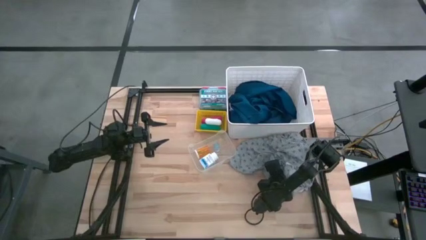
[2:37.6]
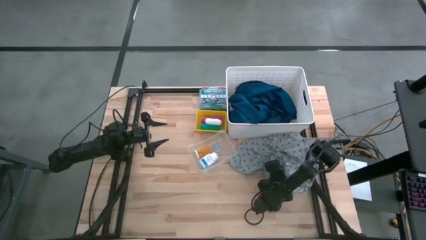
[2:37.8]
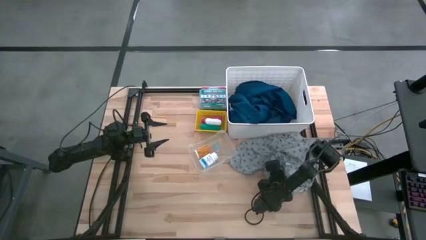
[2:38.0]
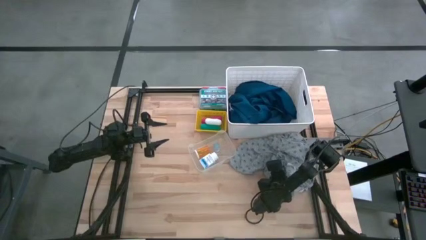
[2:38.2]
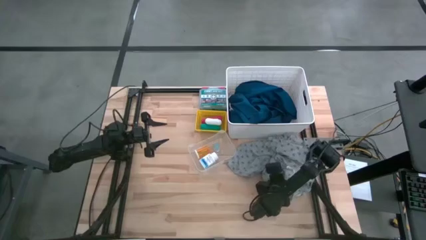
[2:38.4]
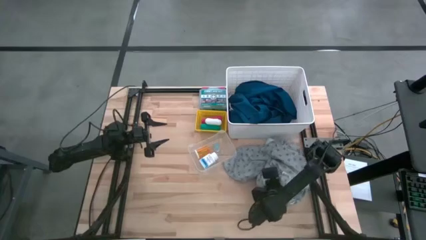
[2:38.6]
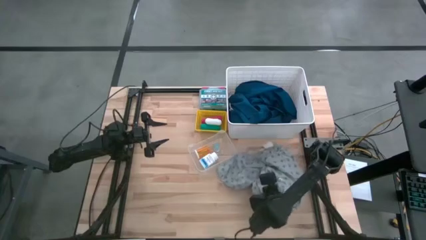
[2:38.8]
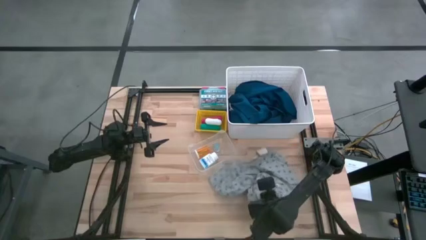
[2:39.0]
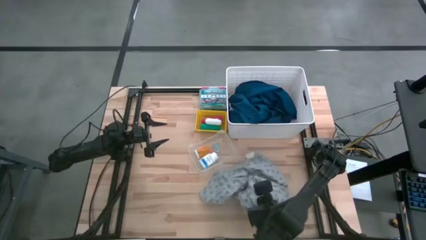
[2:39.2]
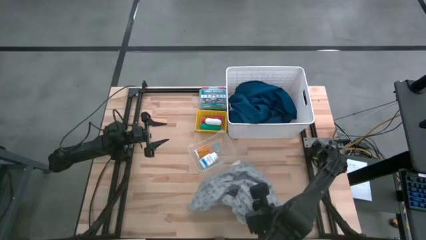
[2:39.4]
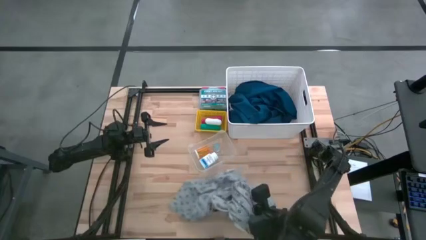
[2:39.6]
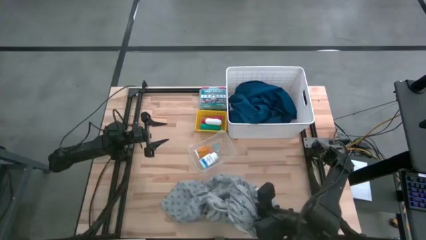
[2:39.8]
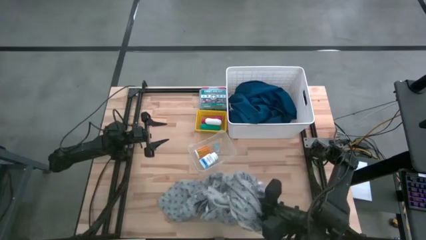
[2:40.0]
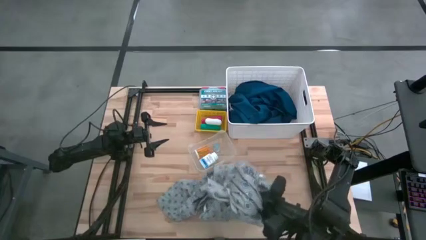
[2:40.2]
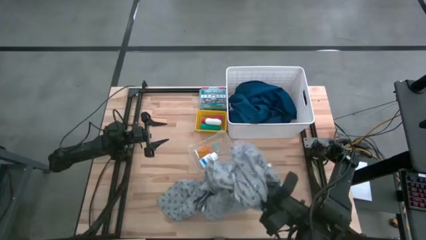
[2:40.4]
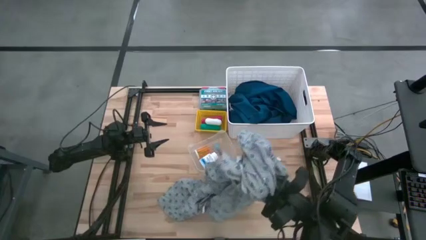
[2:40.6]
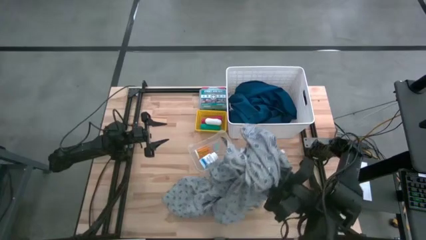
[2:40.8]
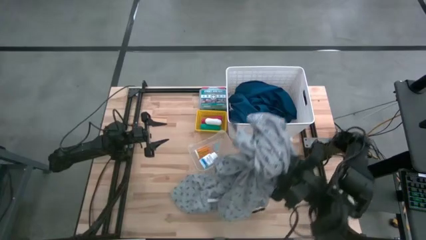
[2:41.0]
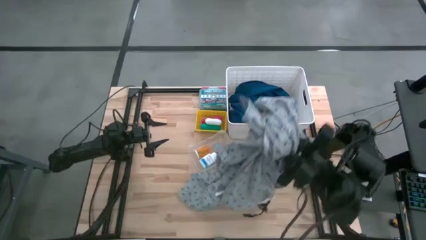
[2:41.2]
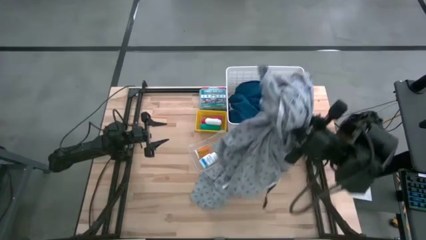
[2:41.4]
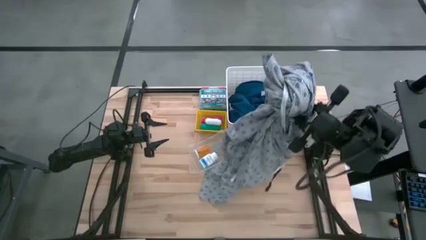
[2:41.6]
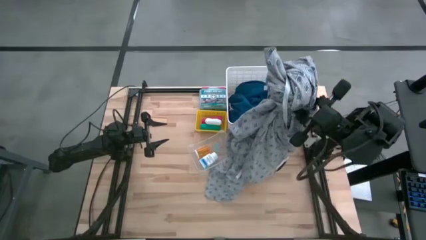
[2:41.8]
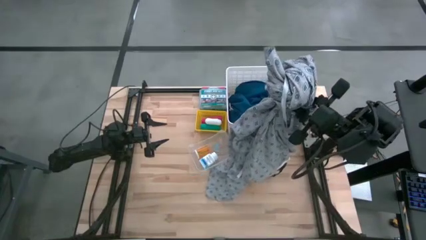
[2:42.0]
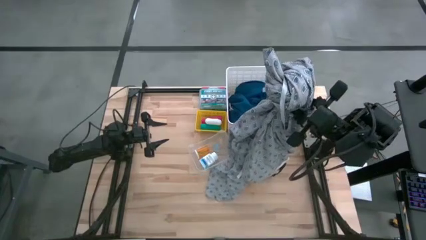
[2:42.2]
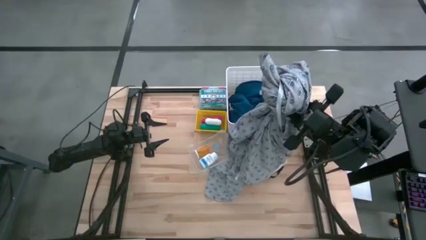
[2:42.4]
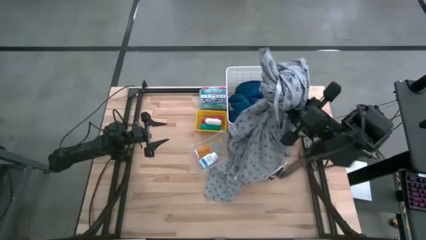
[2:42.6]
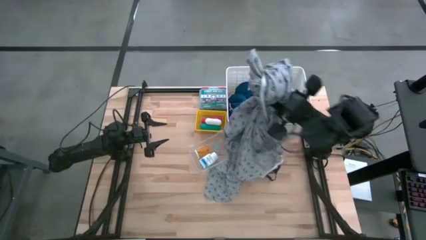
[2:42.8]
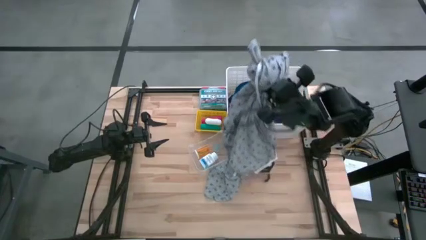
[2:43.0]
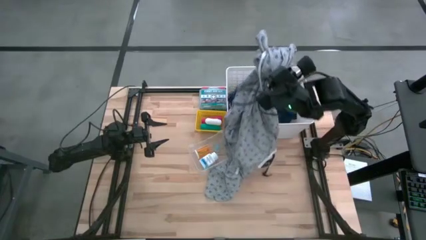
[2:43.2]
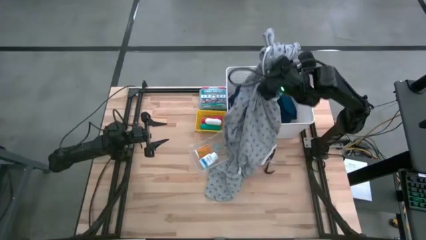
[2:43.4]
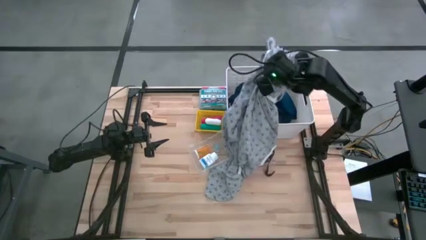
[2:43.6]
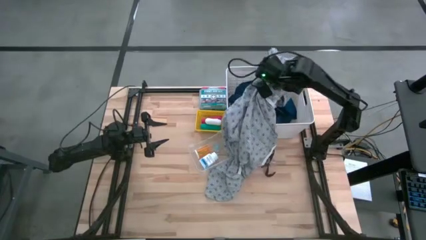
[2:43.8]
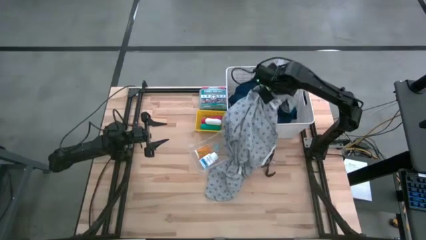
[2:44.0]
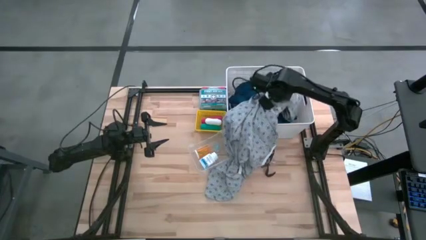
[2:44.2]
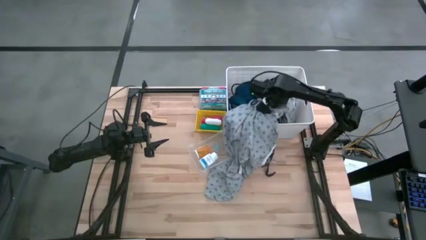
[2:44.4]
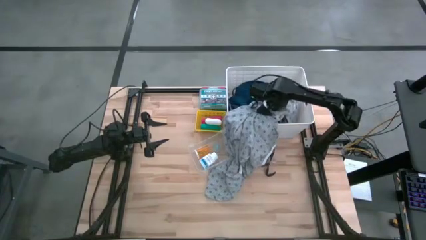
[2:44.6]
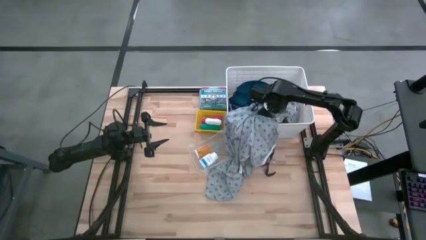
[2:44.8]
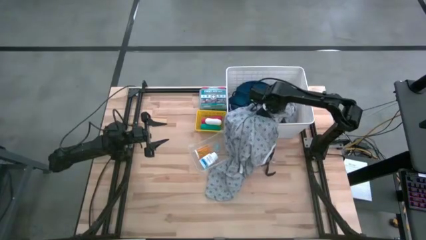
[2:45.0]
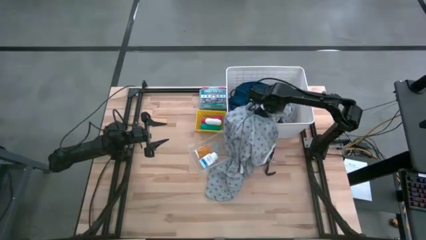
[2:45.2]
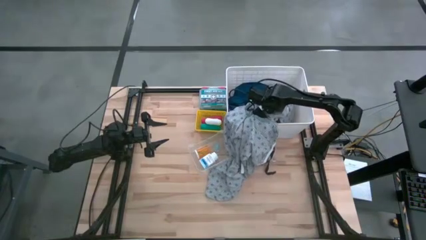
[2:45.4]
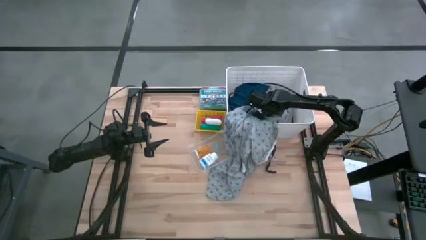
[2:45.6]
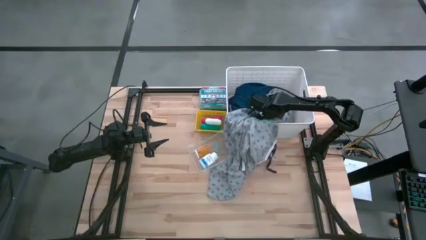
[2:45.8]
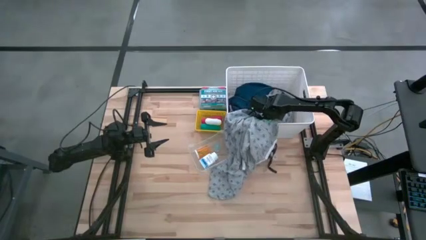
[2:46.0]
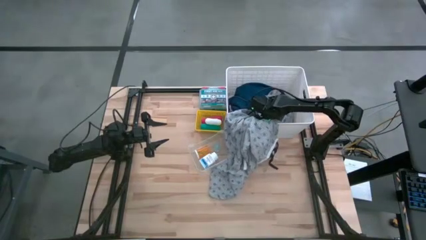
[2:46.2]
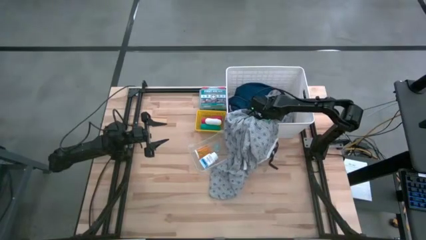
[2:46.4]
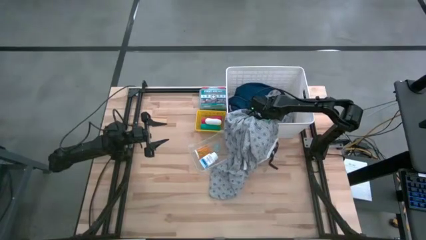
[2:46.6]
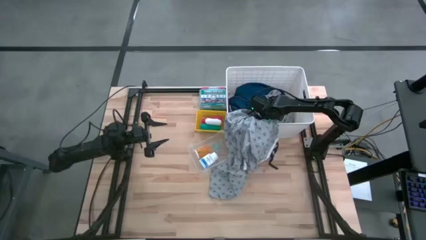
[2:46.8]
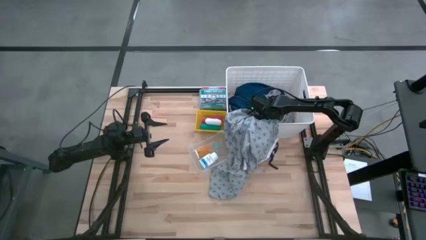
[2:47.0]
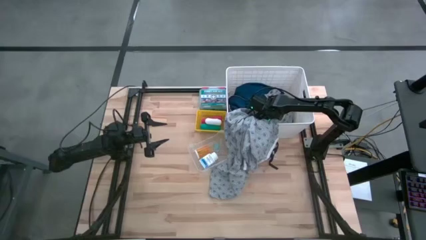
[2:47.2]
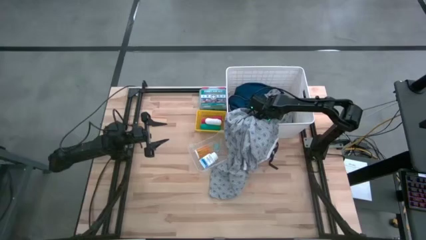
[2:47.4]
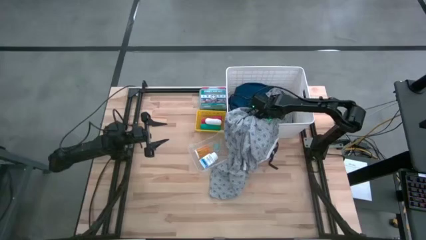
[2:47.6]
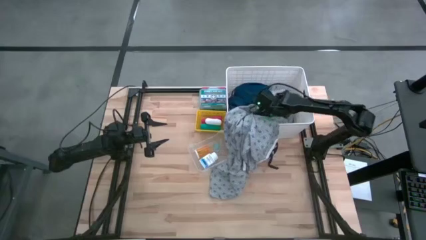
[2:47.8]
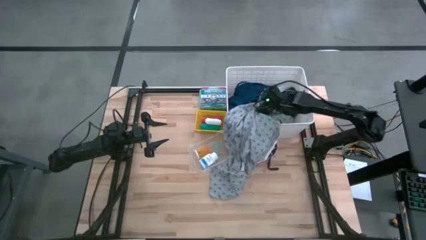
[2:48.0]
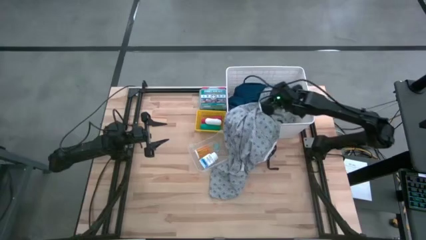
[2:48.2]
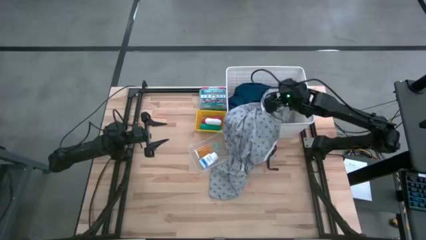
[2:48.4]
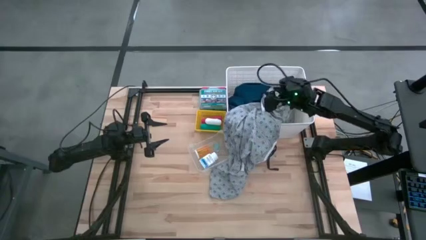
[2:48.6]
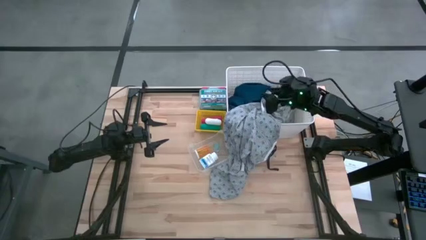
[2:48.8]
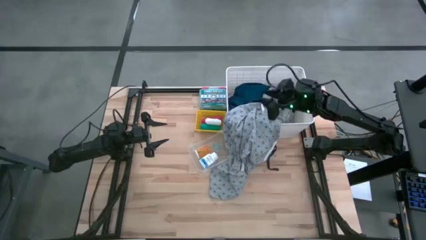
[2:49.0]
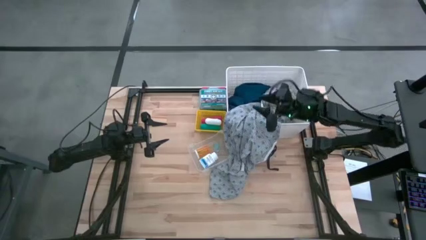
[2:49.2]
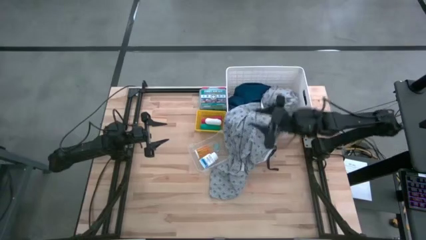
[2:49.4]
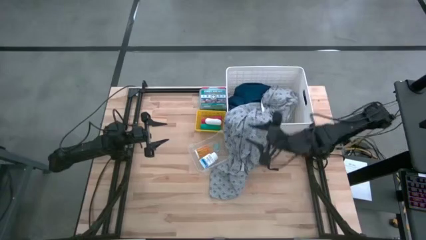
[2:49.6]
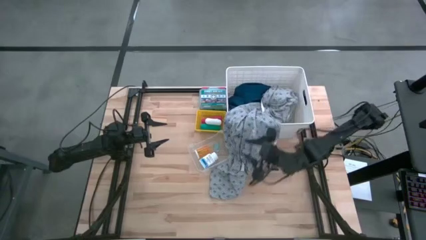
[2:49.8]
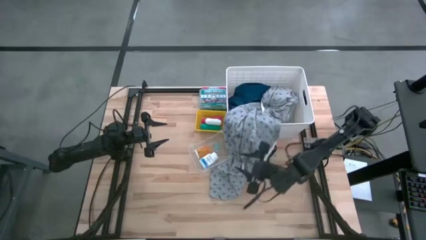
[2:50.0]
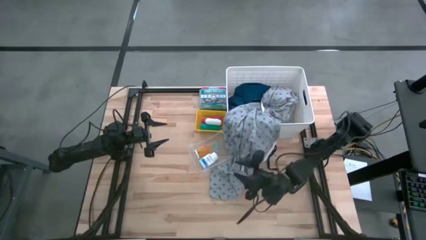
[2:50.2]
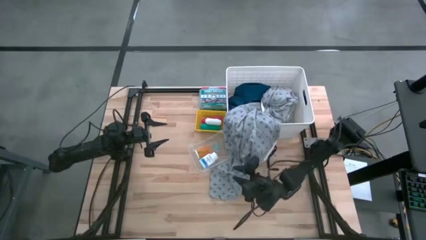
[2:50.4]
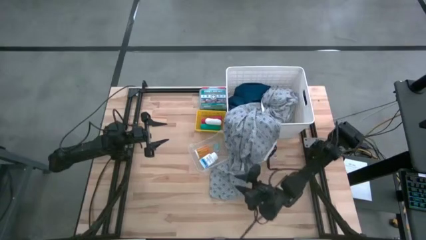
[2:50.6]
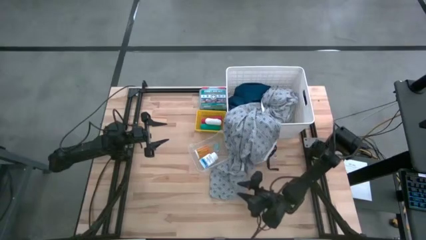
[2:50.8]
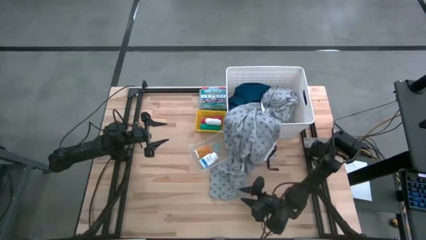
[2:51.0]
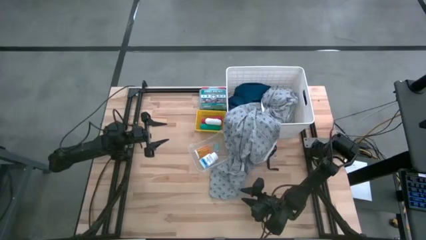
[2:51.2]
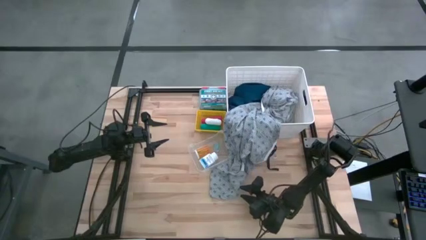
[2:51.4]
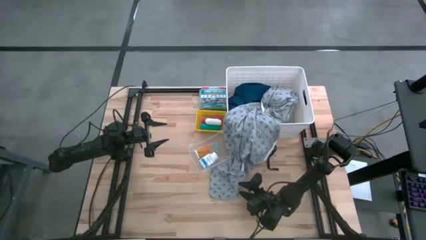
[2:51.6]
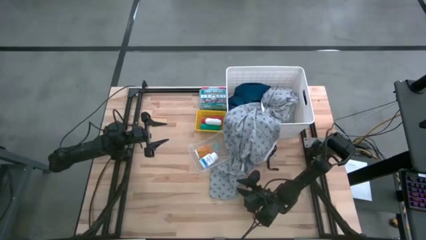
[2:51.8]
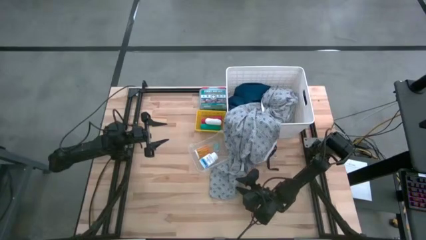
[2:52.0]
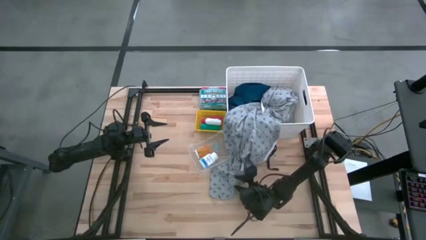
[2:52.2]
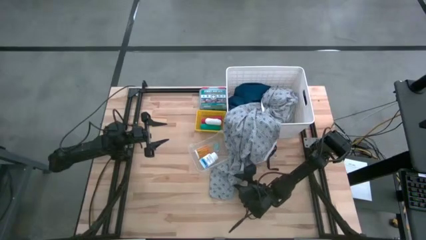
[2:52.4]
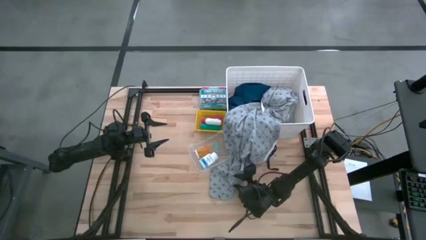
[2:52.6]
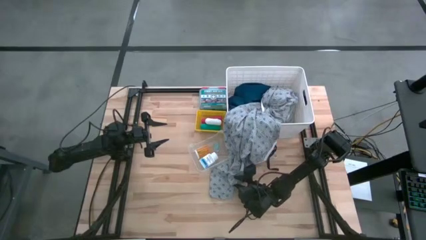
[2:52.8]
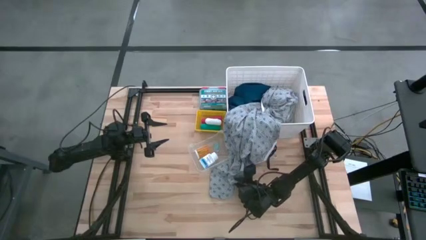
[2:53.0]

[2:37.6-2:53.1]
Task: Pick & Place Medicine items
Put the gray patient gown into the white bin
